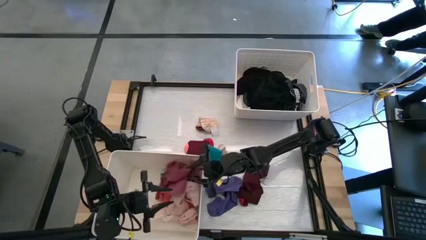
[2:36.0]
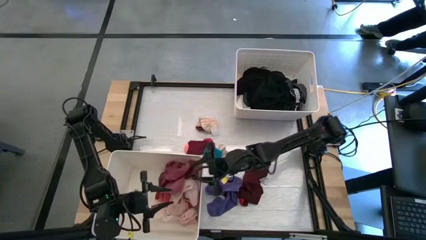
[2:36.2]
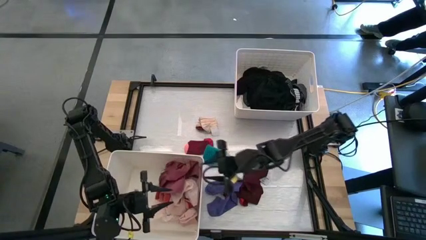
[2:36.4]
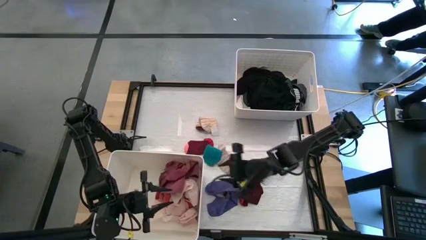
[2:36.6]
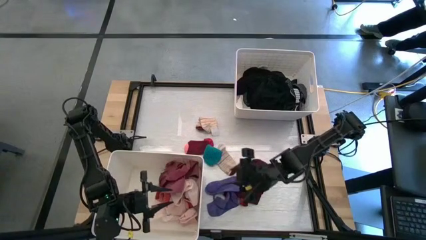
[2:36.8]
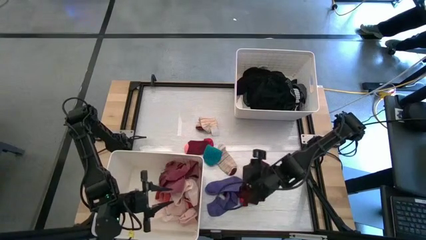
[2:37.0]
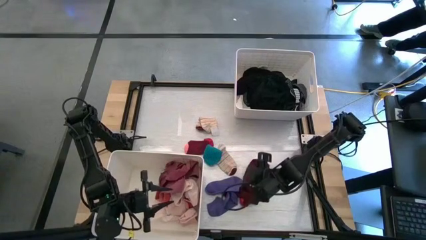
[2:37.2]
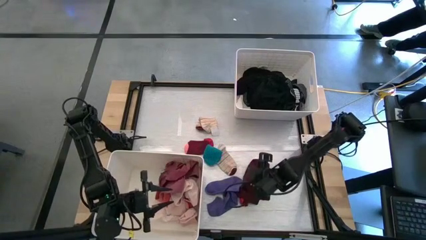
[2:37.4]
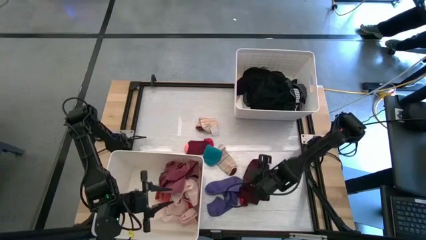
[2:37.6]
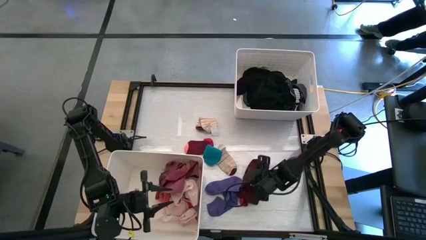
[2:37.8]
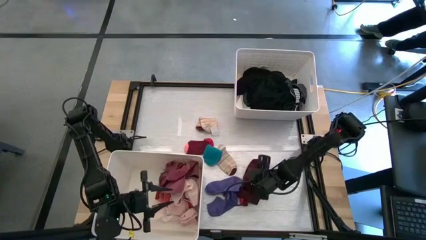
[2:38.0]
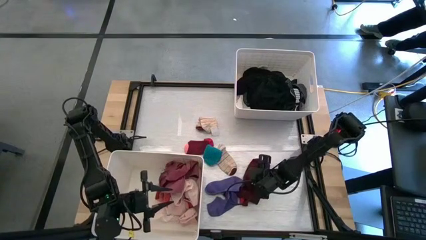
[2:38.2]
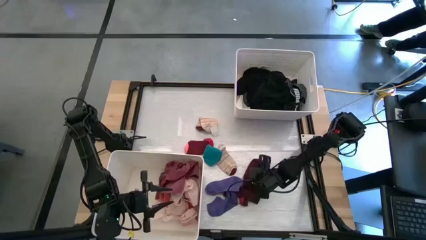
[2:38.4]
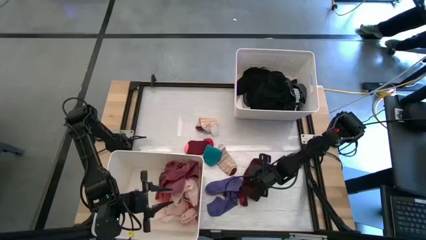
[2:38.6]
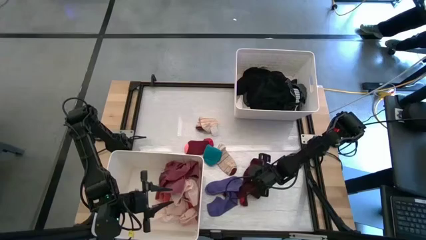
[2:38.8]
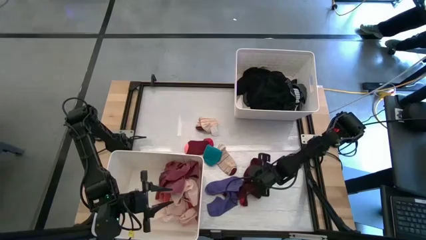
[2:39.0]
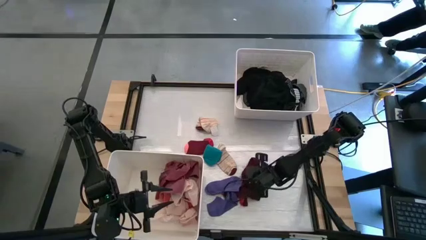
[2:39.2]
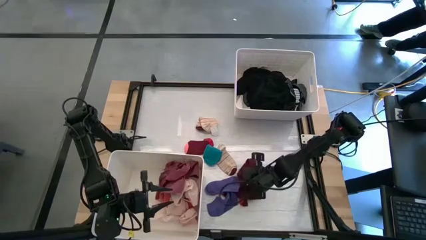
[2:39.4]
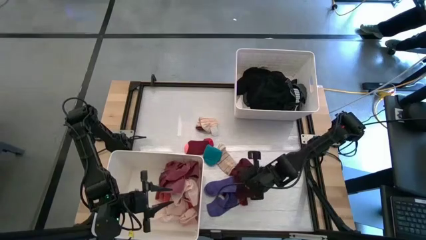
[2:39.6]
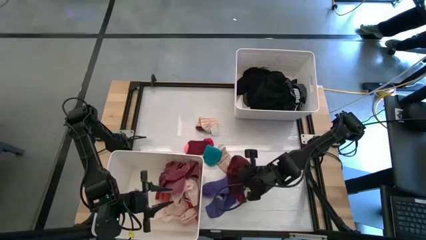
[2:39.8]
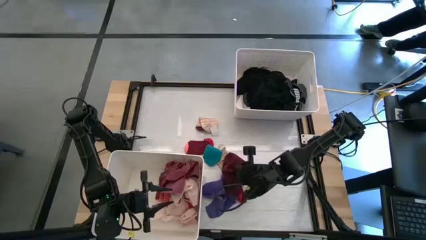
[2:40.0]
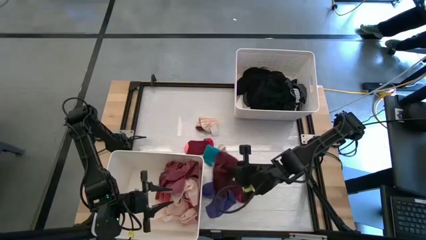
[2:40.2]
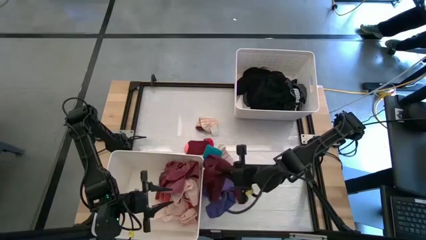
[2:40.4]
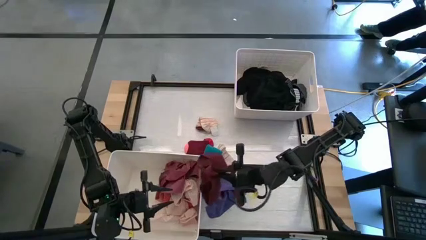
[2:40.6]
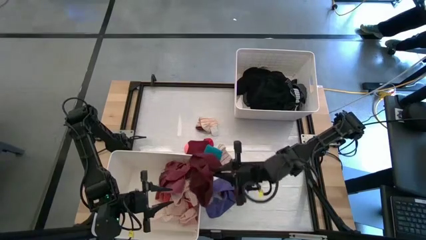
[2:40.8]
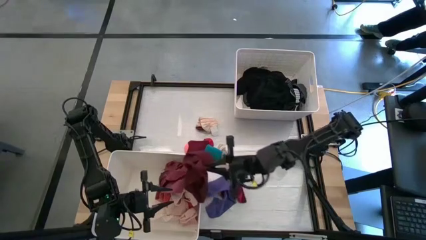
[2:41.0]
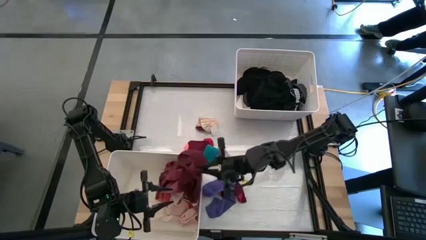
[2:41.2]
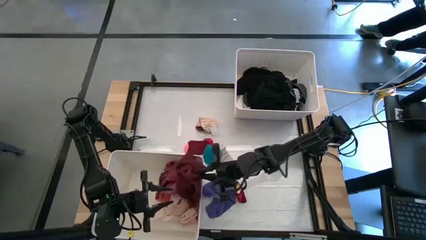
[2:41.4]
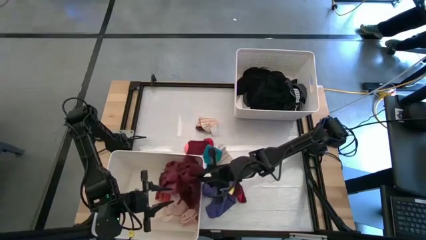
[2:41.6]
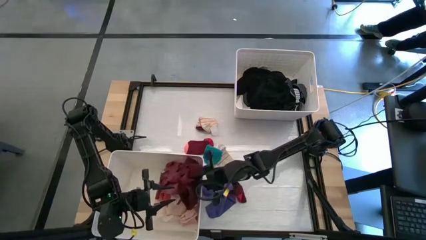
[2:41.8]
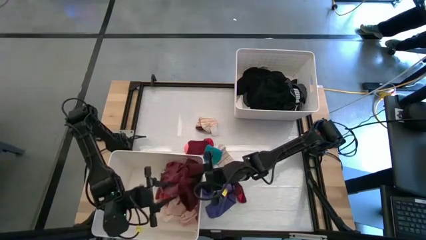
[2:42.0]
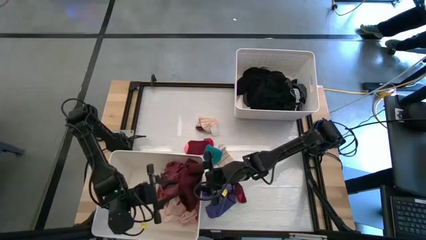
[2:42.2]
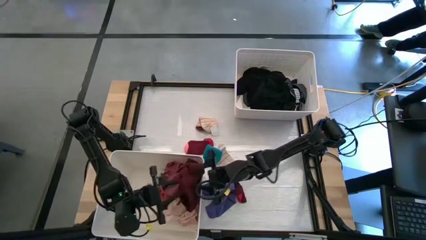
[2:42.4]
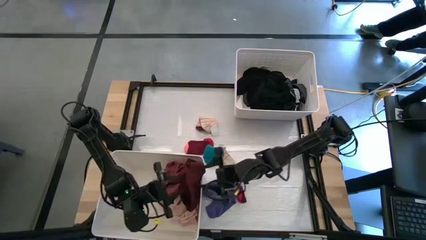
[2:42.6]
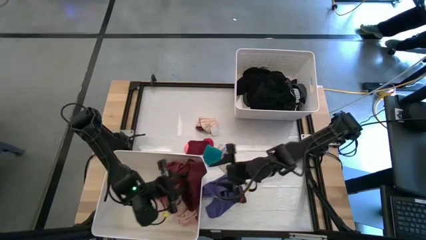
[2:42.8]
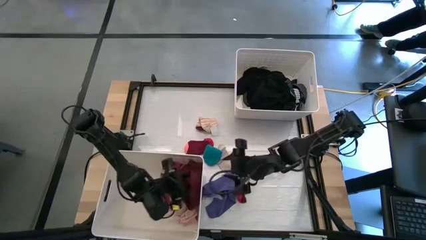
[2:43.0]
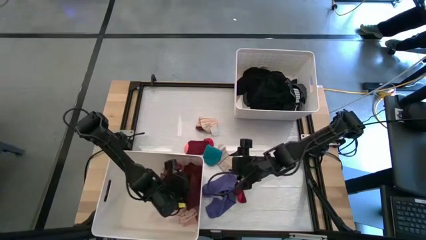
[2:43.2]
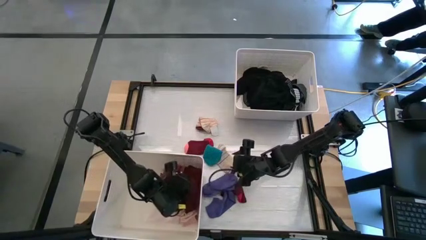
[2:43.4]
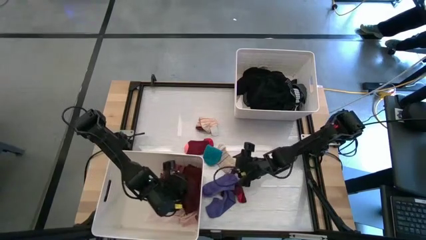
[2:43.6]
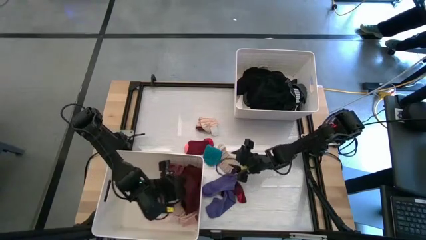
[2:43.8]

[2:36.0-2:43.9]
Task: Sort clothes
Put the dark red underwear into the bottom white laundry bin

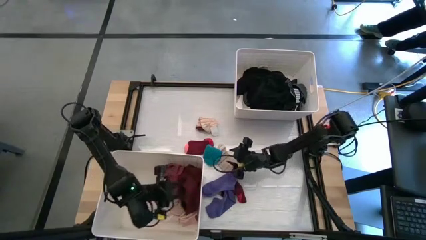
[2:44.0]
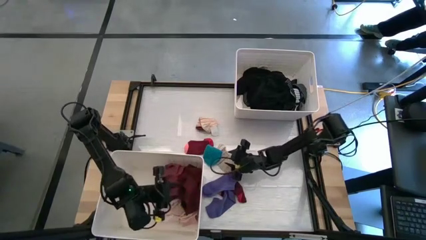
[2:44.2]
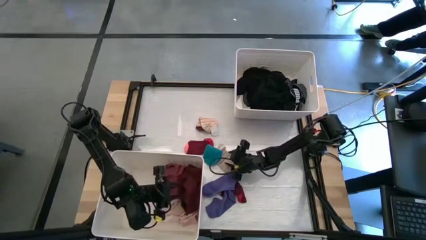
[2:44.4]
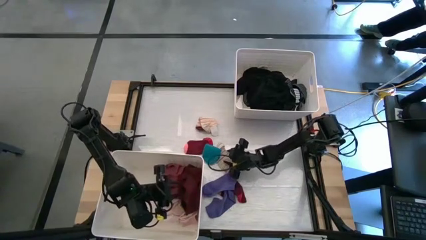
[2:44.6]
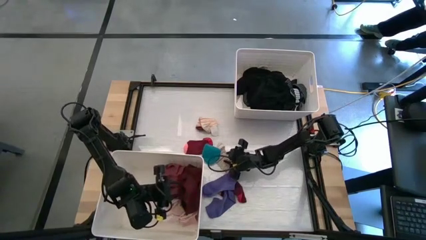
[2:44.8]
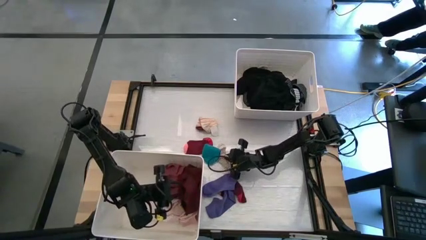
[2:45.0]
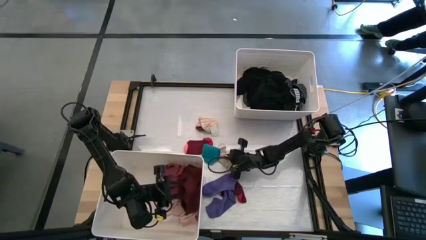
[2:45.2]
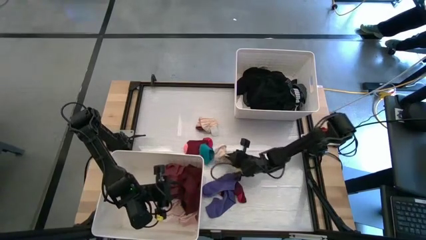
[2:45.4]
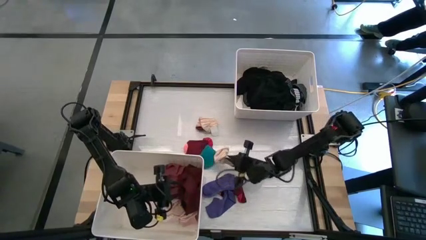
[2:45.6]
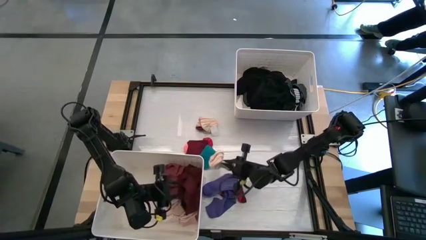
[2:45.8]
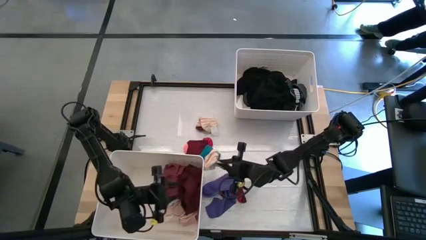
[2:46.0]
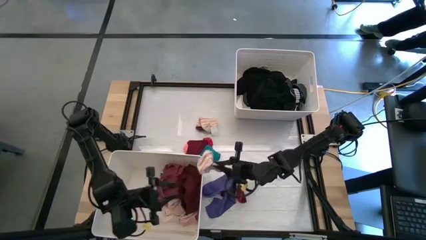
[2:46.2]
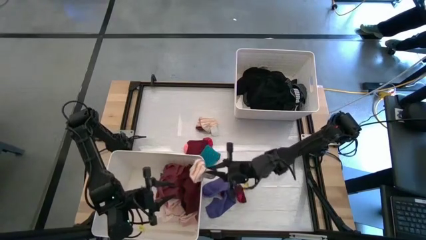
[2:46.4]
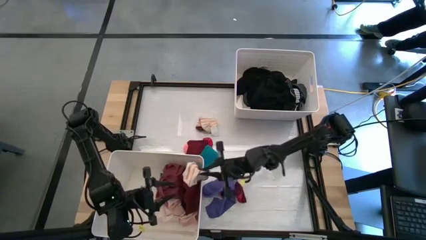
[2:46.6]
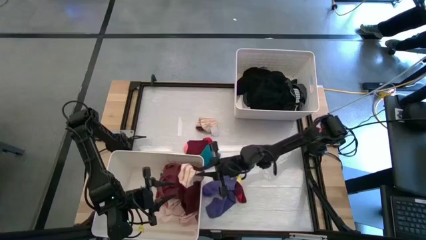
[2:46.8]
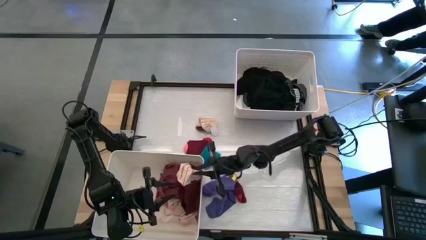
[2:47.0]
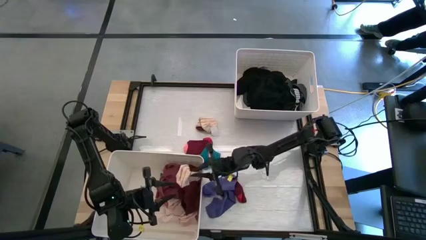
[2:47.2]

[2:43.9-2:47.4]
Put the white striped sock into the bottom white laundry bin

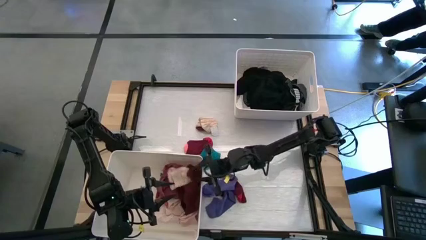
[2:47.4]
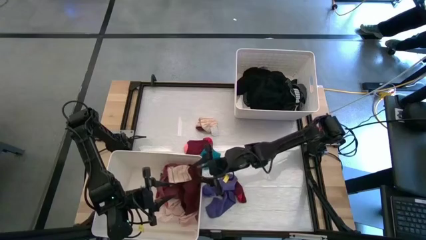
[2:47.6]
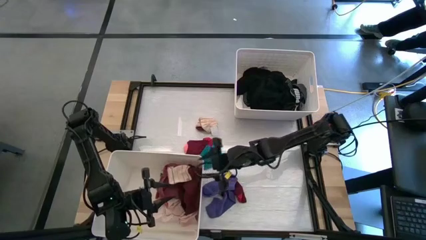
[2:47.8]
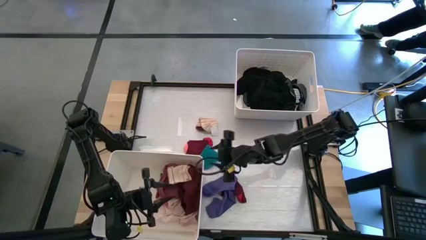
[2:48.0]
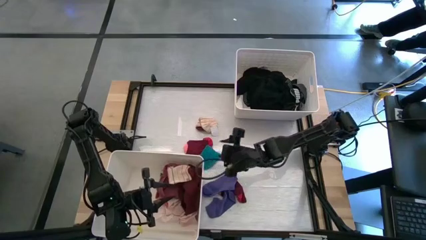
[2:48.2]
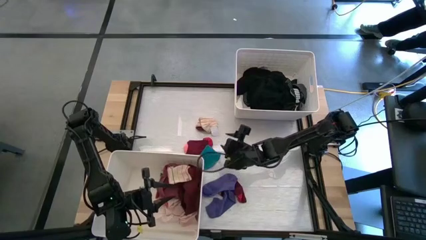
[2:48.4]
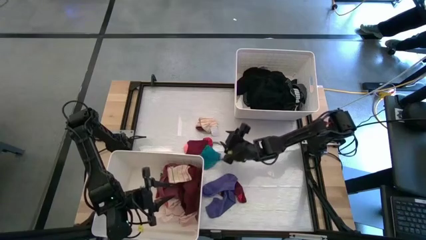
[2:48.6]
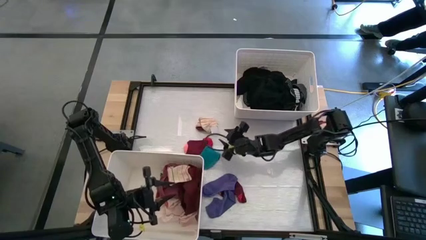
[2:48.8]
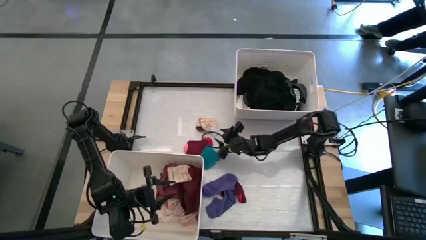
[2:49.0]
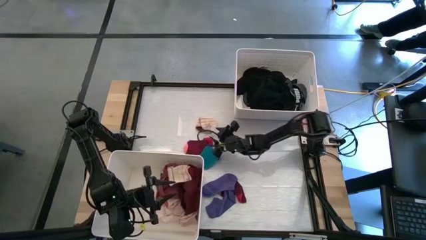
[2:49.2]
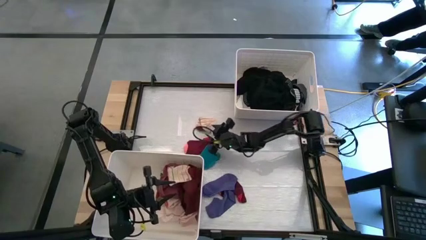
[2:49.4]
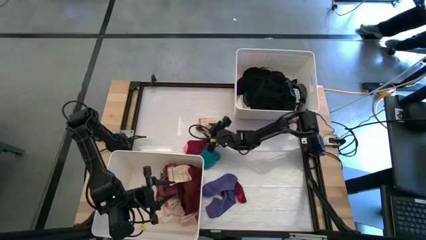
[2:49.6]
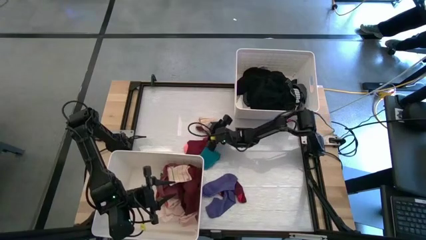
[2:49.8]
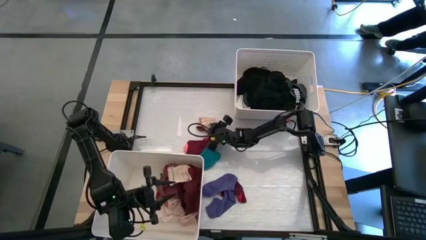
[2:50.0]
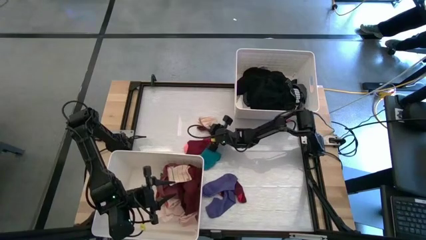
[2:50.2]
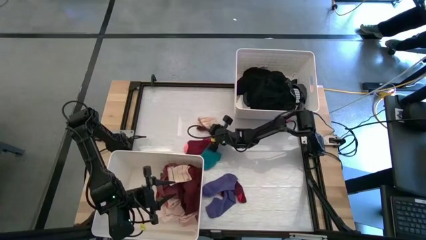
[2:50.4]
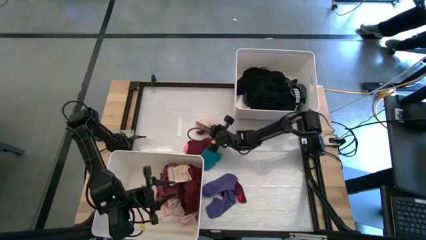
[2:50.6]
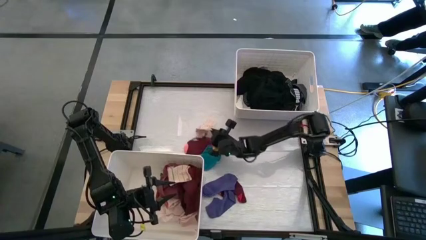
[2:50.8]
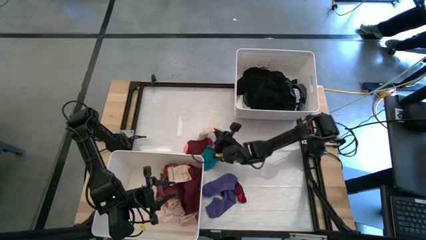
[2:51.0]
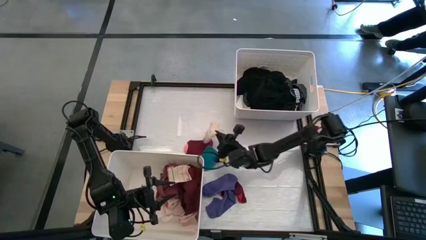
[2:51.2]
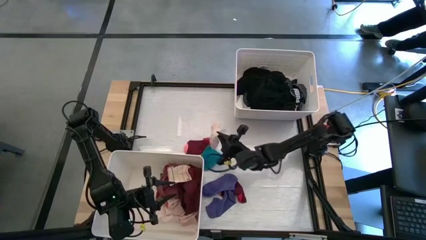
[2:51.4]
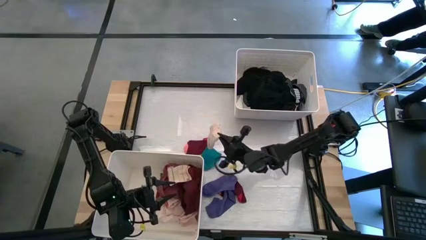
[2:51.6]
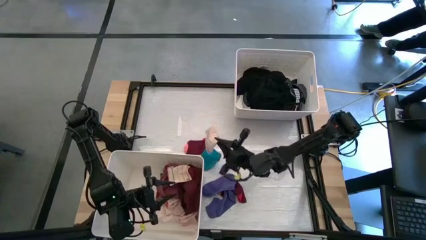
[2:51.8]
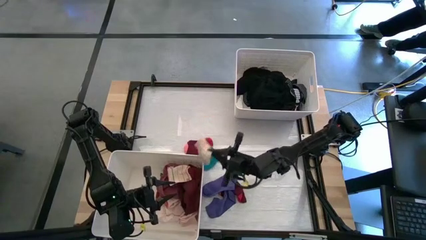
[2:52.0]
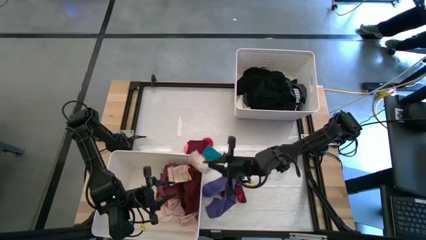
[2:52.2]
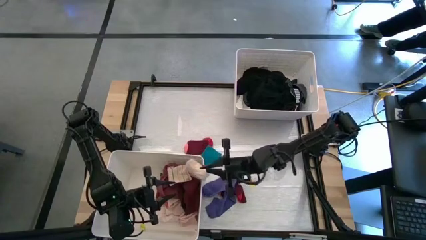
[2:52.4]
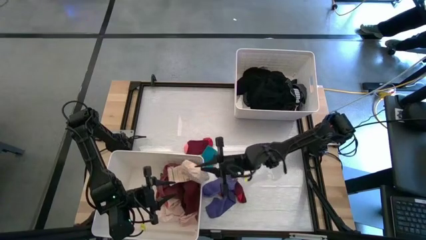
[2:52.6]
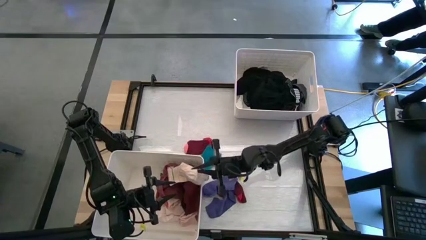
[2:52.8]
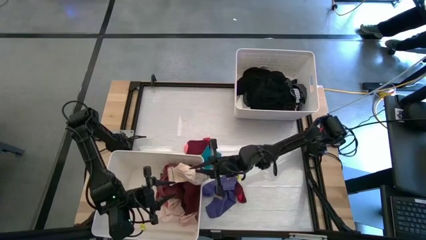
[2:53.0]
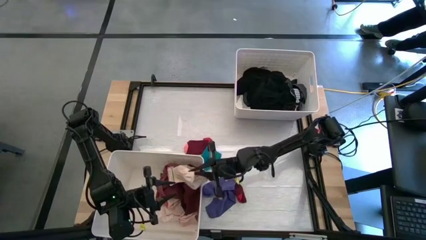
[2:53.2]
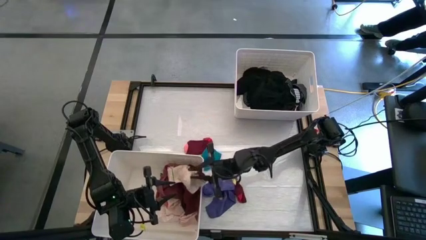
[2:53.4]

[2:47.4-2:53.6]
Put the white striped sock into the bottom white laundry bin
